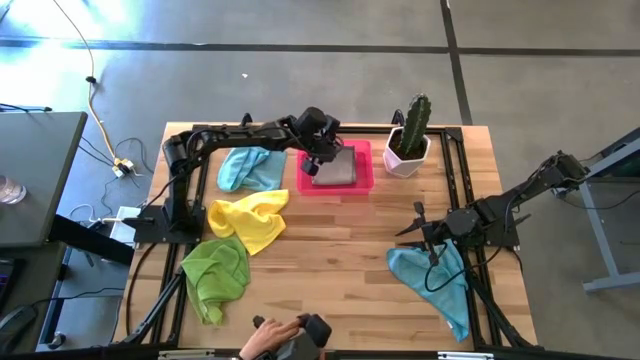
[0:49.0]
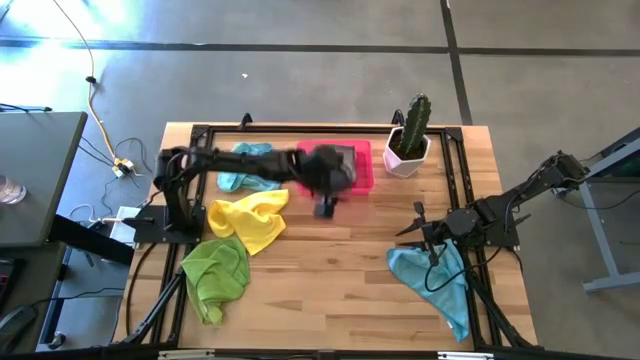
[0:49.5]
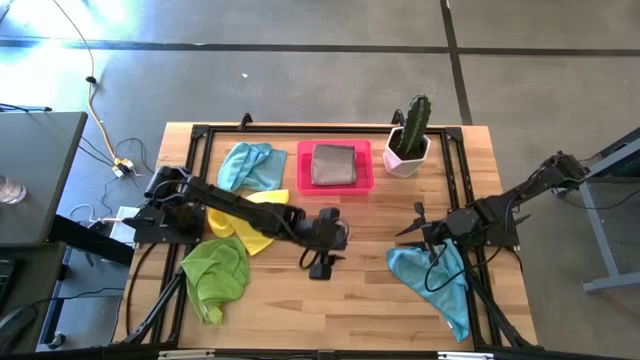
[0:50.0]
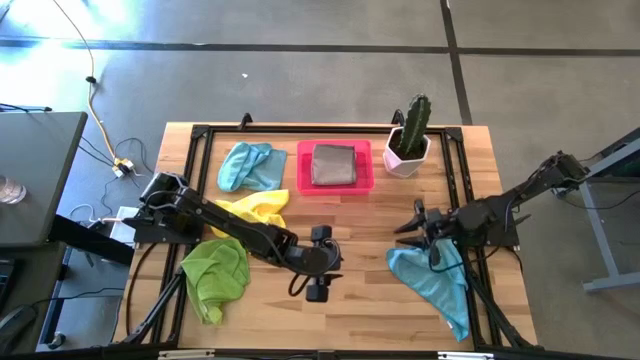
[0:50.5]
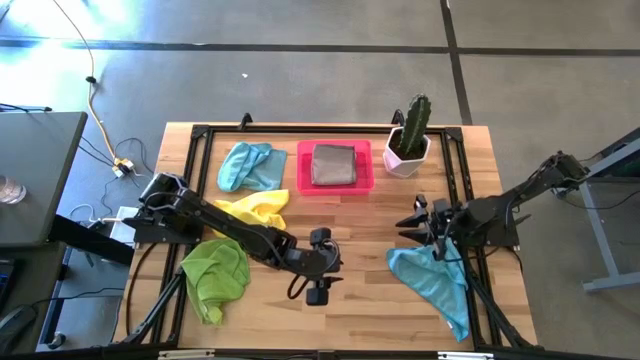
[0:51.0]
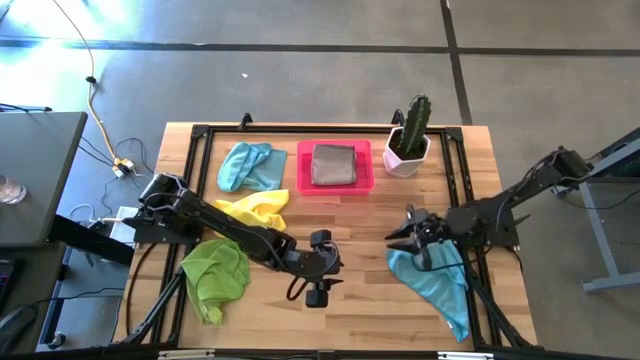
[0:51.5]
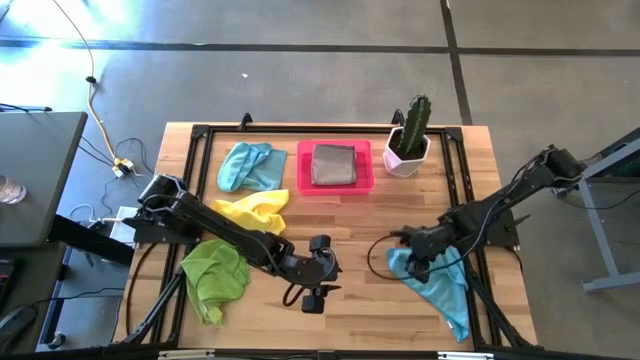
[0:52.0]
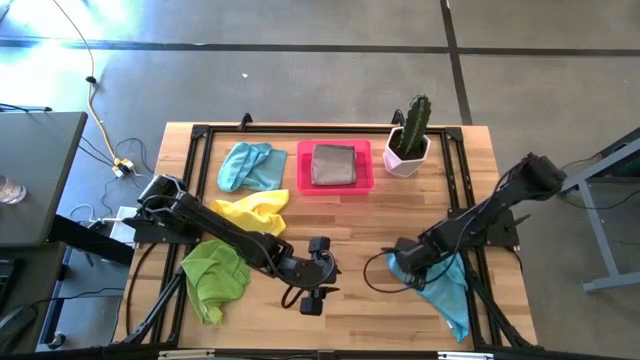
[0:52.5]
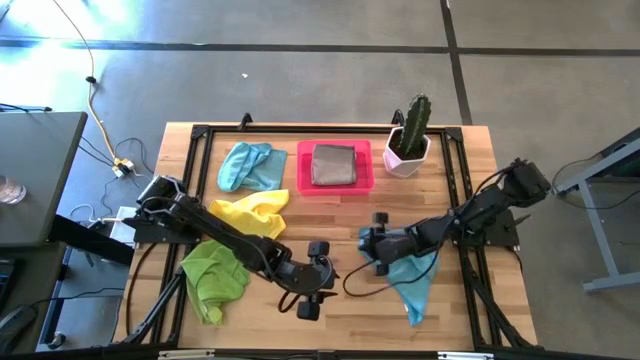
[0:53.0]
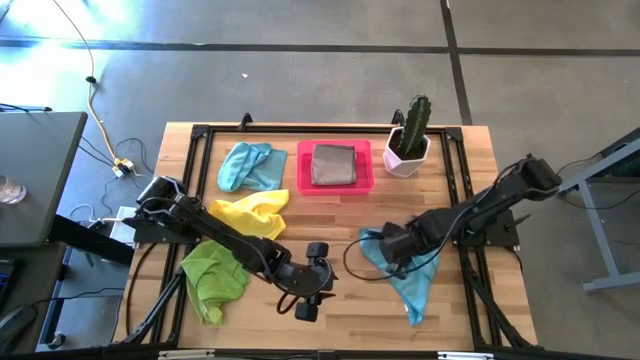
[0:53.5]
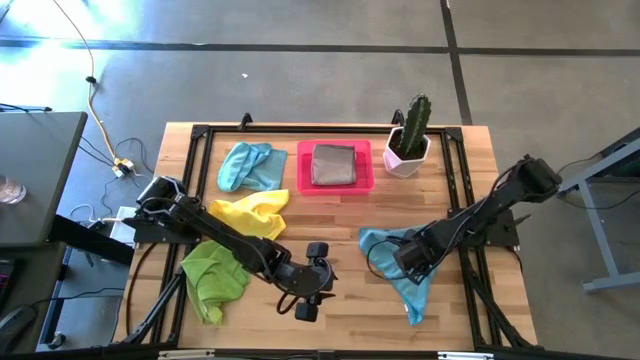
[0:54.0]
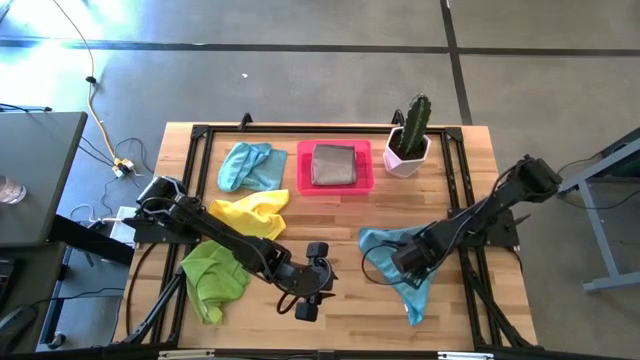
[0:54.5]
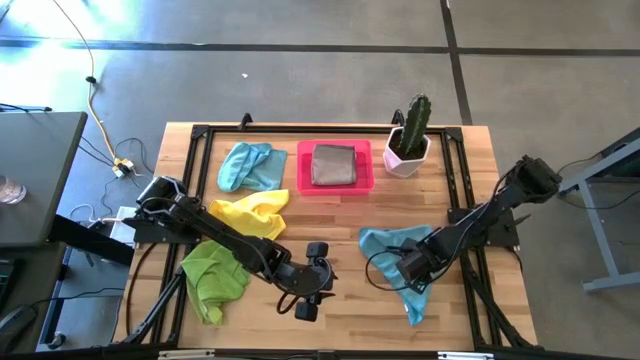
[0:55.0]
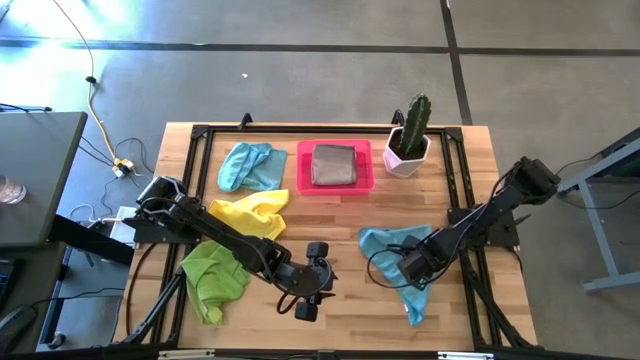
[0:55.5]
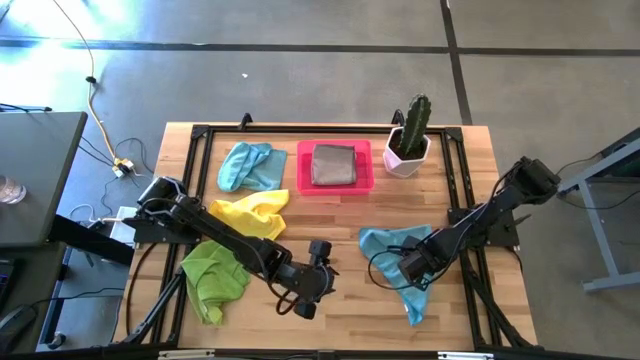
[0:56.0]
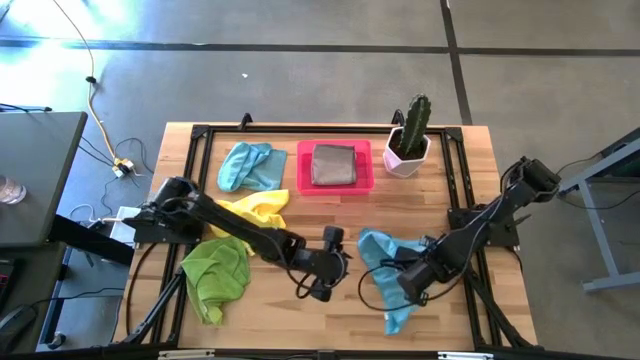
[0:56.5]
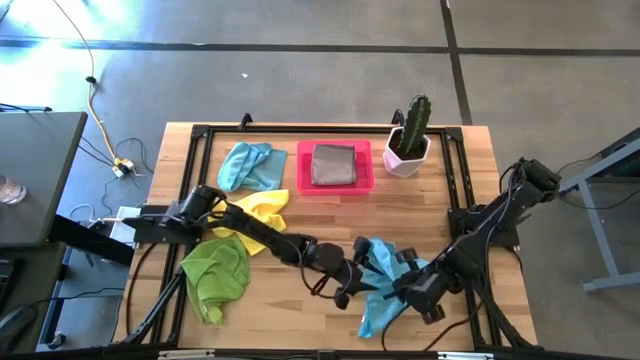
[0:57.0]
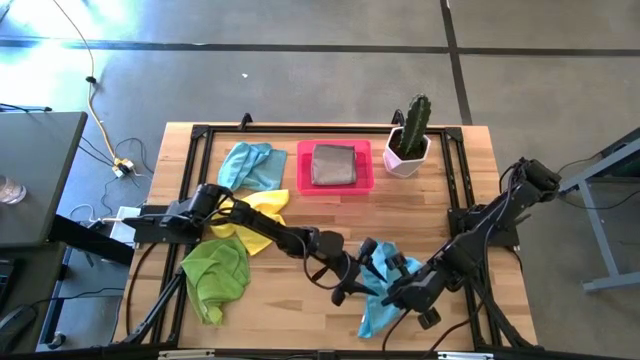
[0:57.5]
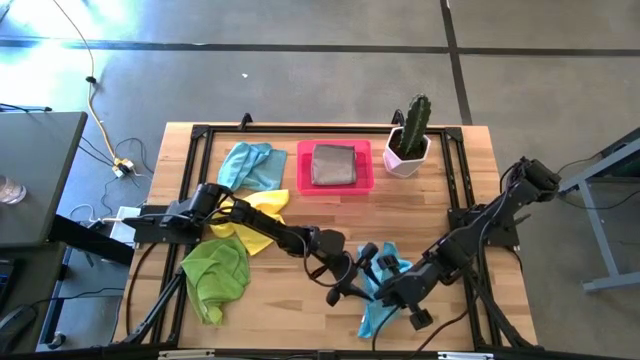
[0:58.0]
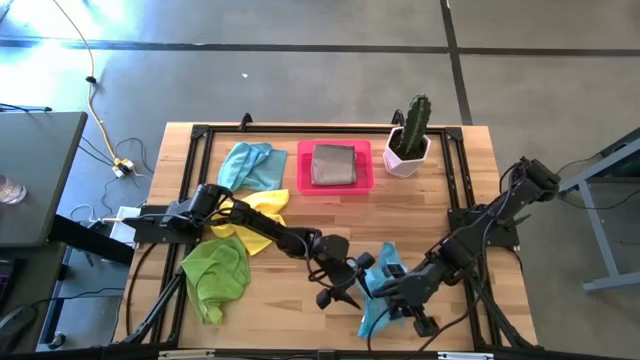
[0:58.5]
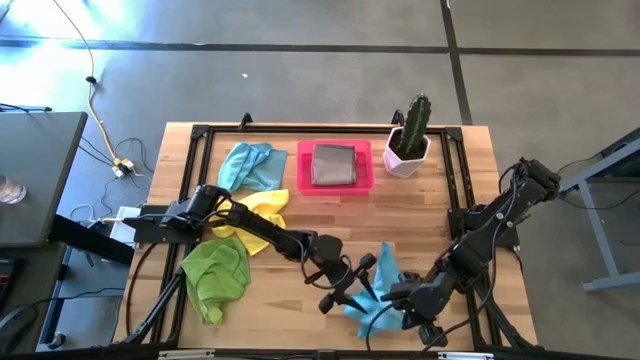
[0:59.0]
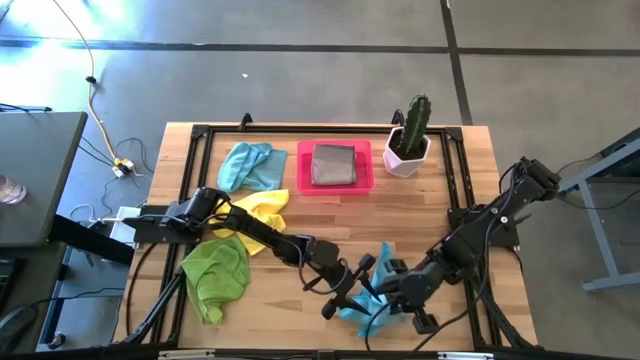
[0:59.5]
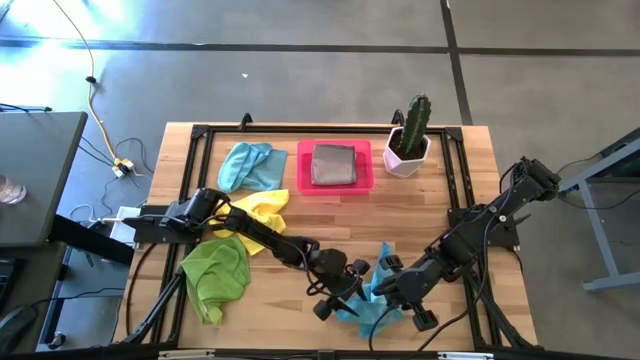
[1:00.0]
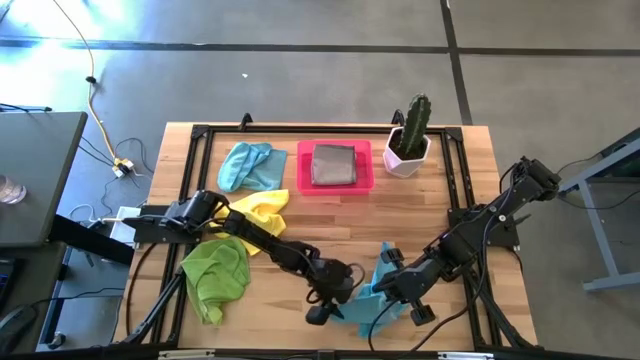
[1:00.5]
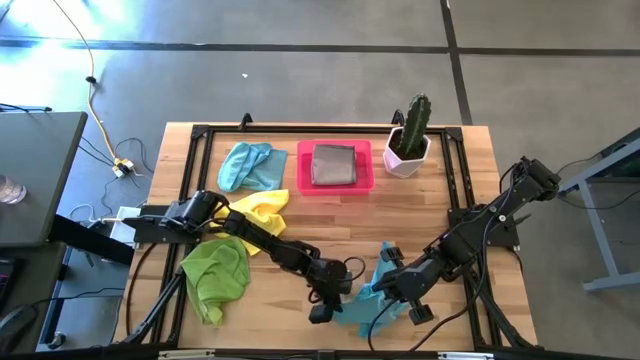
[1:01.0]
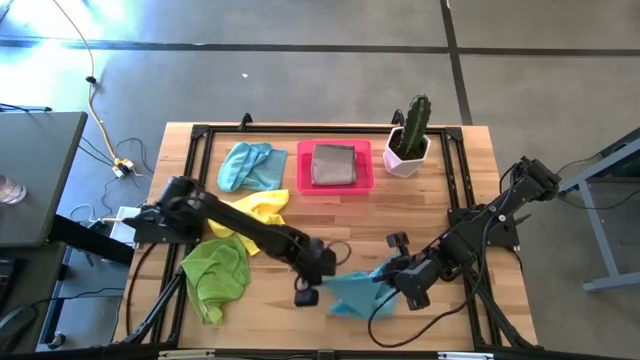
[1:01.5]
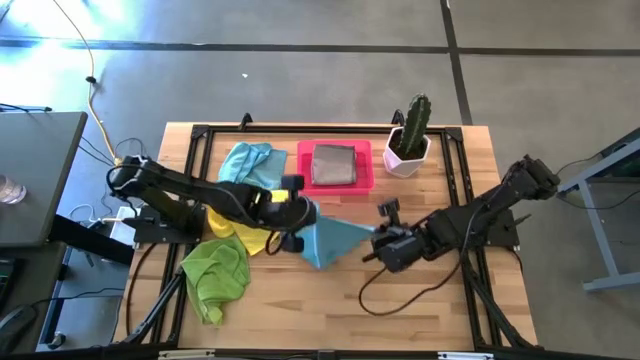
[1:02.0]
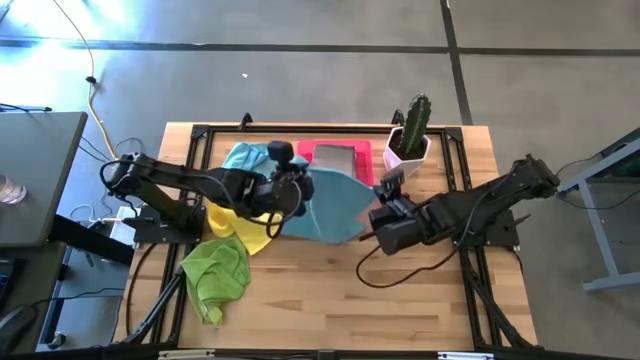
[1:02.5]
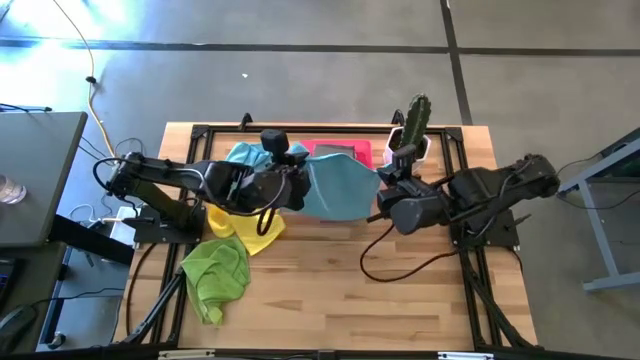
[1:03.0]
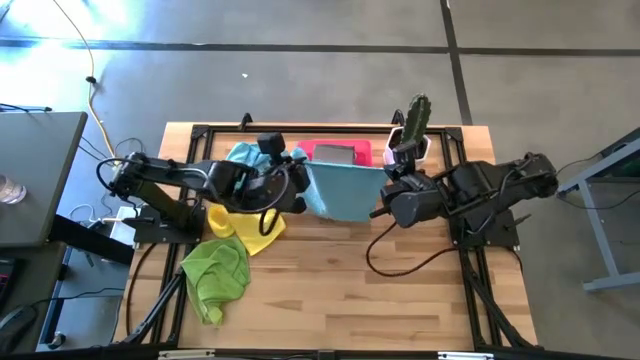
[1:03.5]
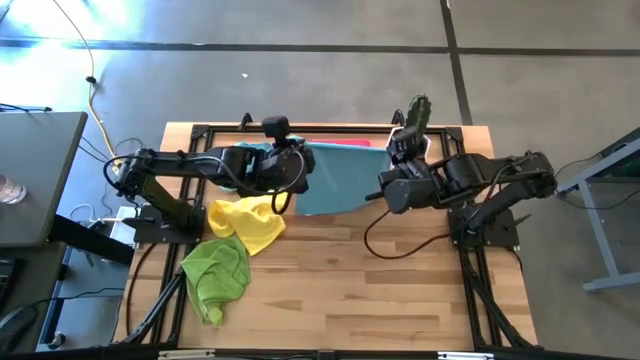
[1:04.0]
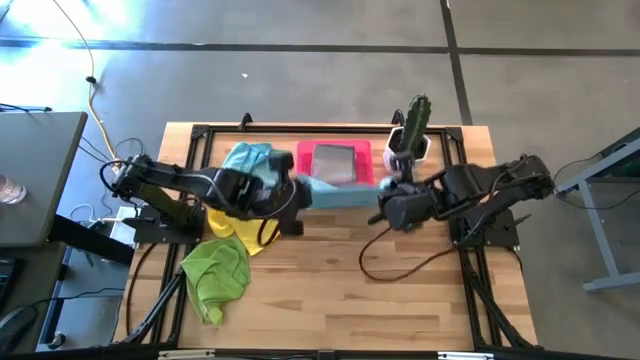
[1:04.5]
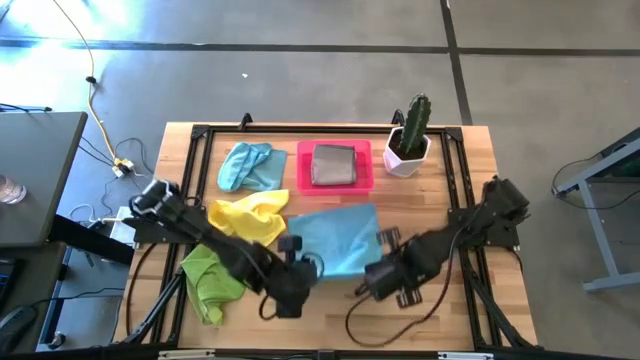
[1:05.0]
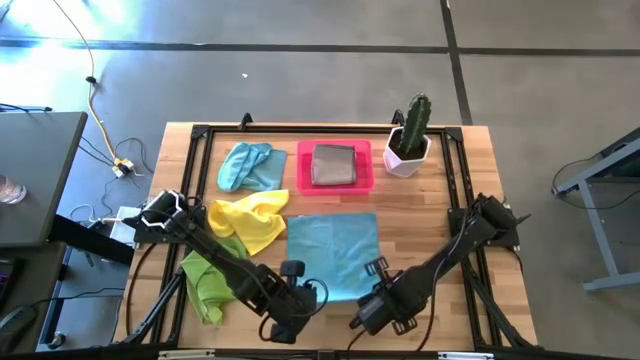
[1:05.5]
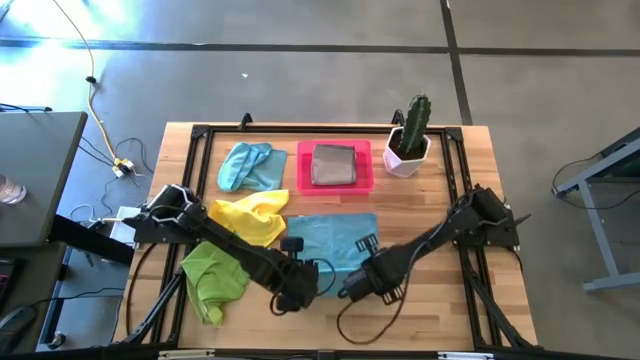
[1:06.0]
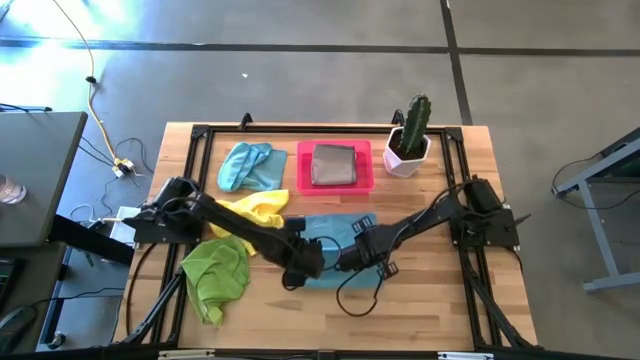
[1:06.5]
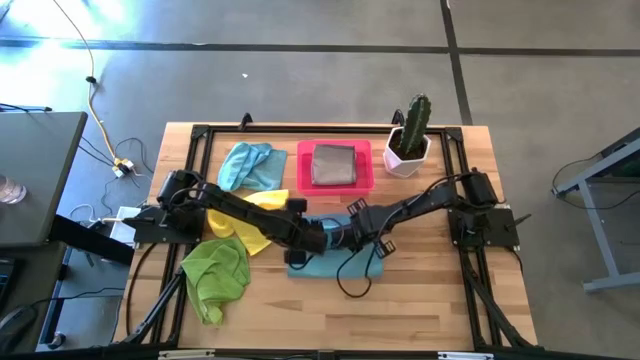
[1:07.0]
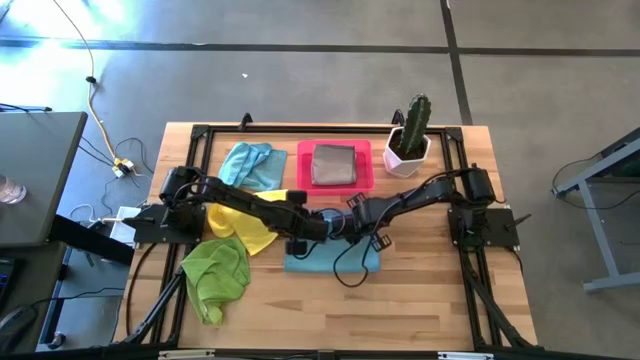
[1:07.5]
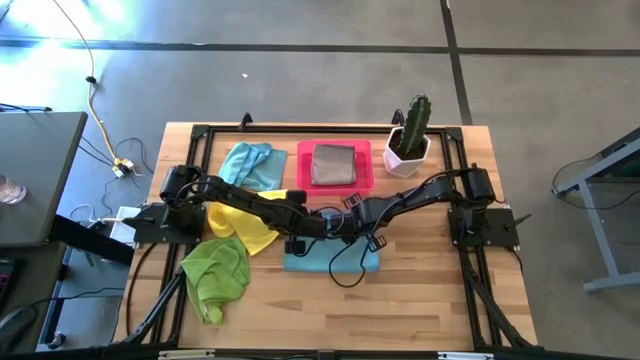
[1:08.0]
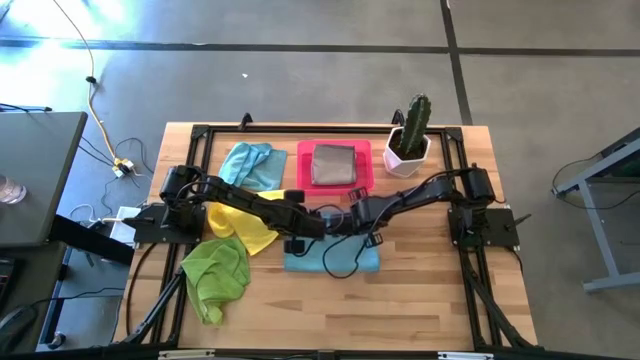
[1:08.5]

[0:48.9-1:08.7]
Task: Fold microfiber towels
Fold the bottom blue microfiber cloth
